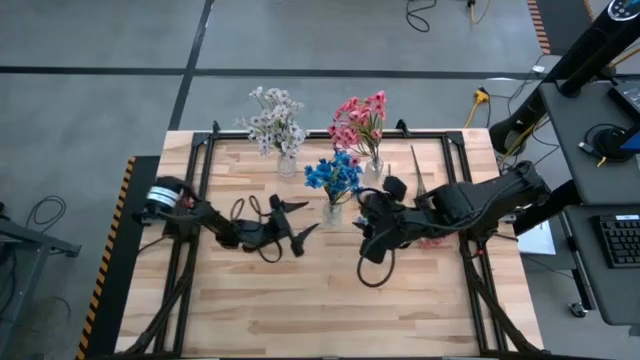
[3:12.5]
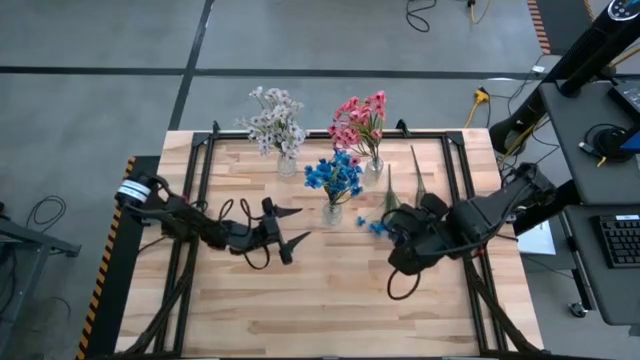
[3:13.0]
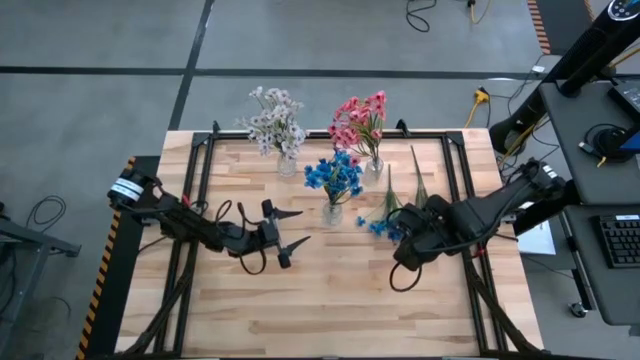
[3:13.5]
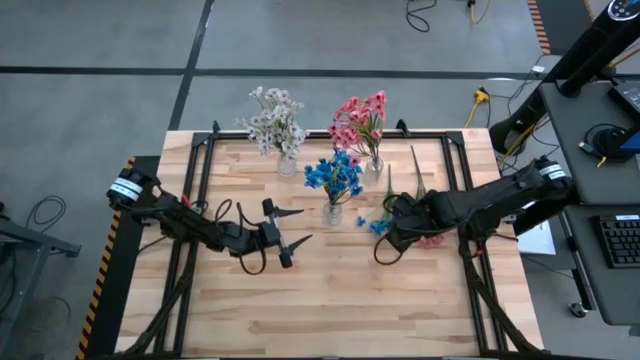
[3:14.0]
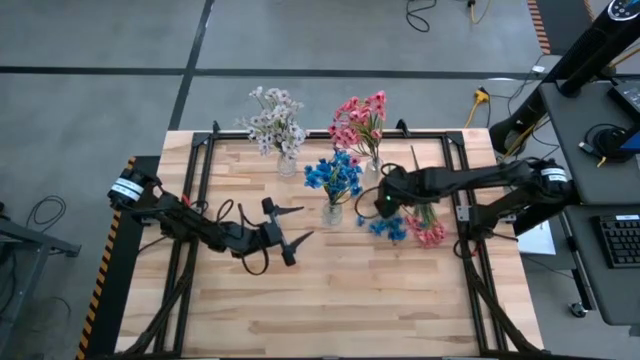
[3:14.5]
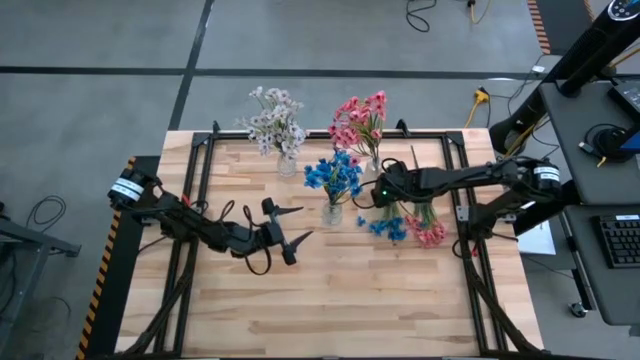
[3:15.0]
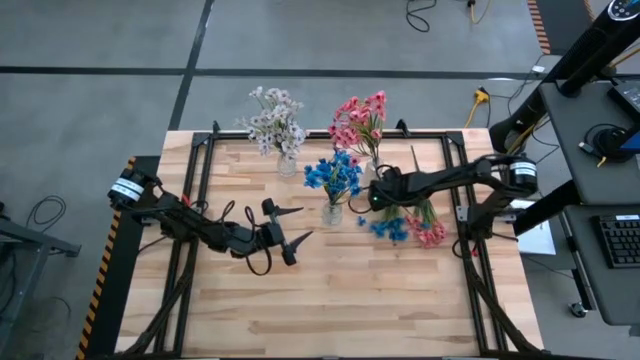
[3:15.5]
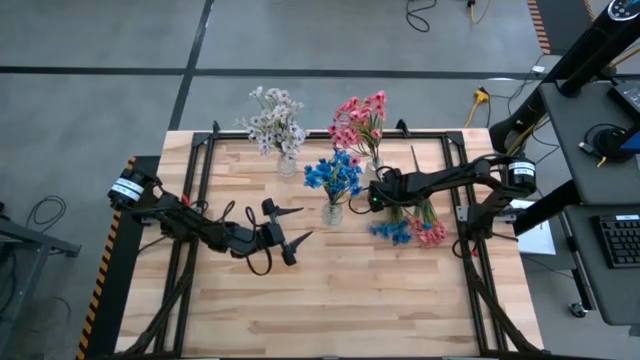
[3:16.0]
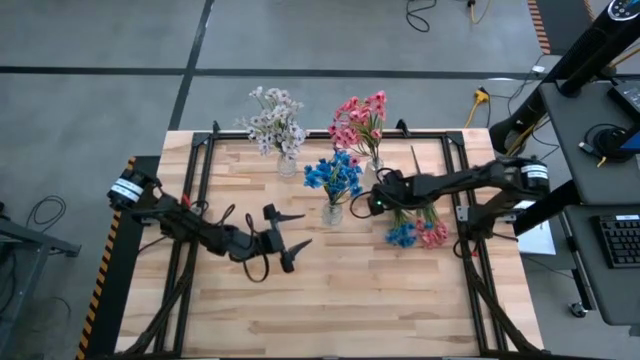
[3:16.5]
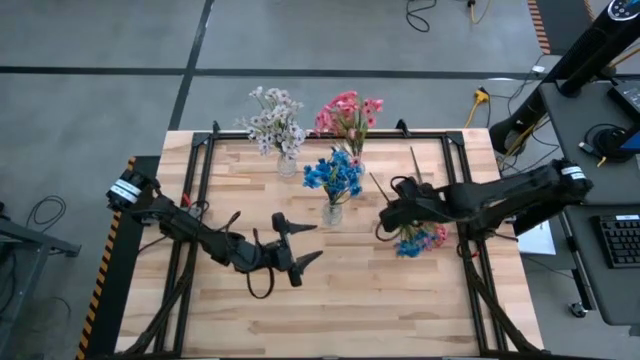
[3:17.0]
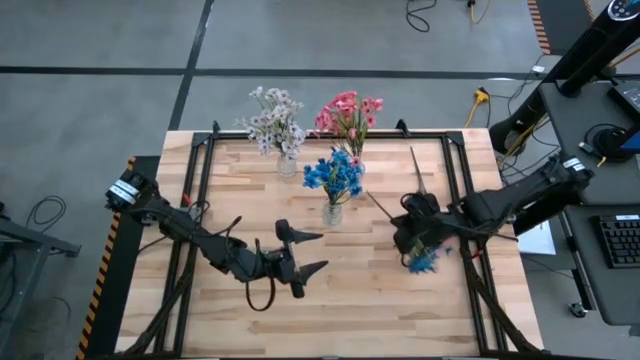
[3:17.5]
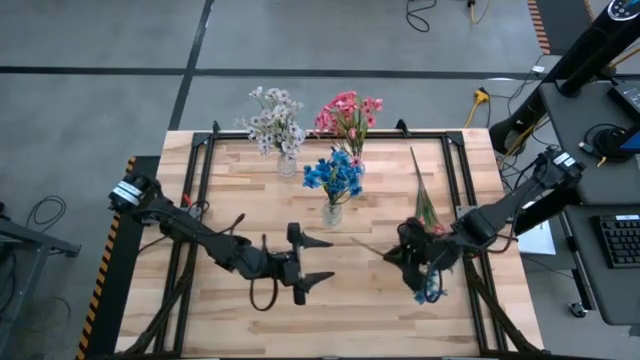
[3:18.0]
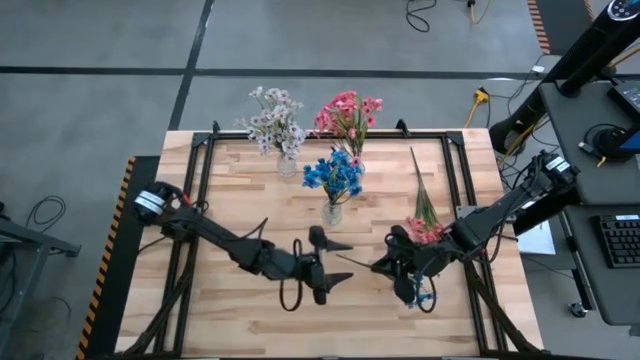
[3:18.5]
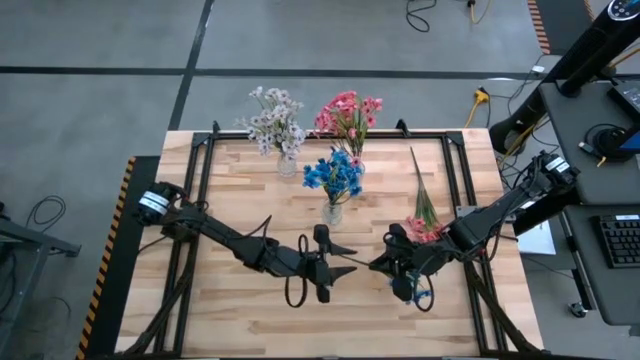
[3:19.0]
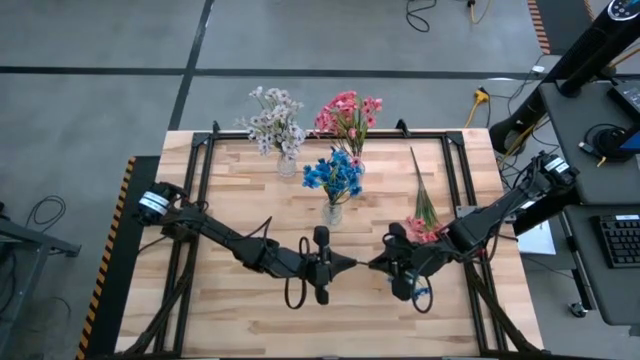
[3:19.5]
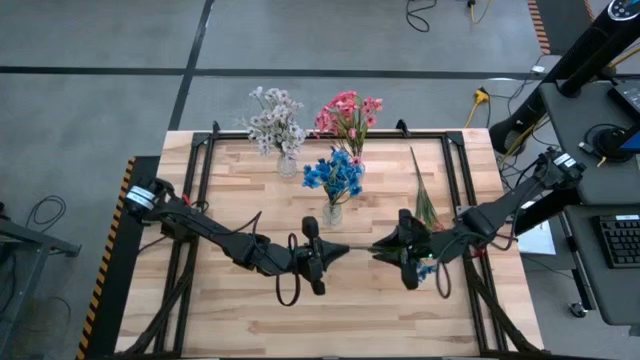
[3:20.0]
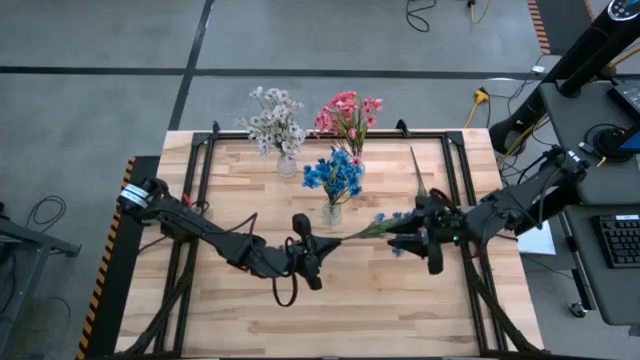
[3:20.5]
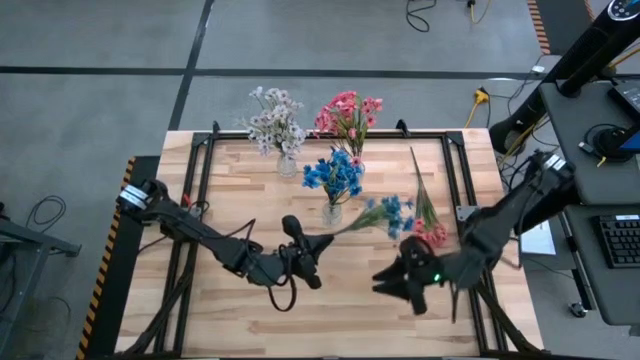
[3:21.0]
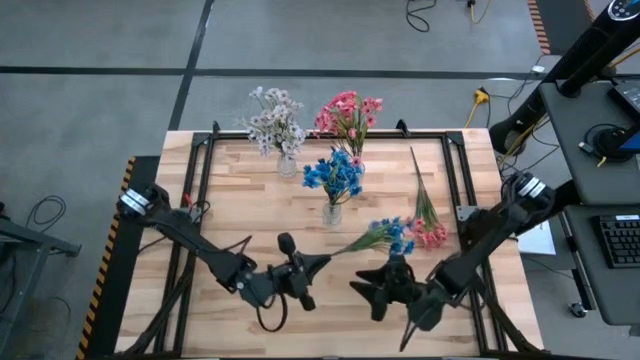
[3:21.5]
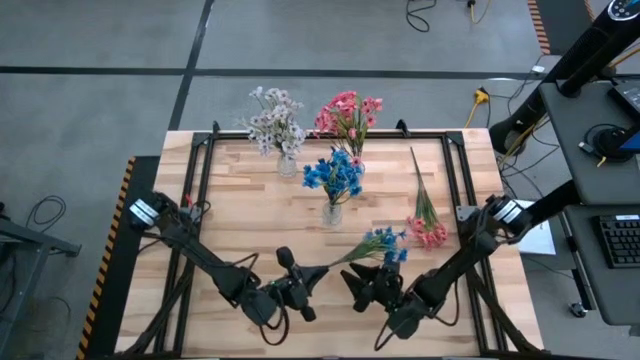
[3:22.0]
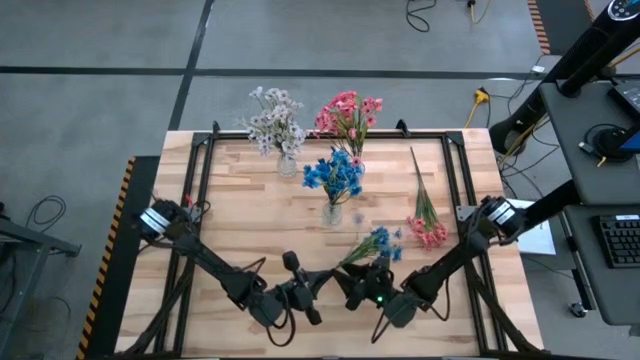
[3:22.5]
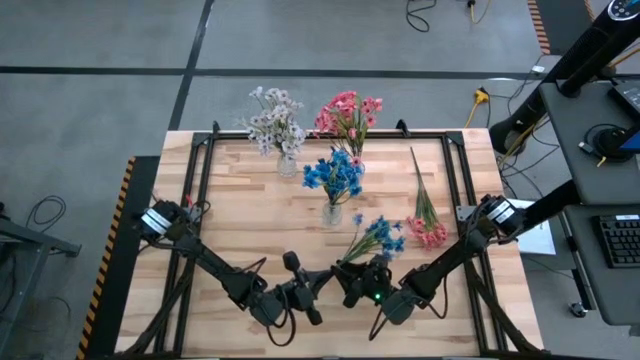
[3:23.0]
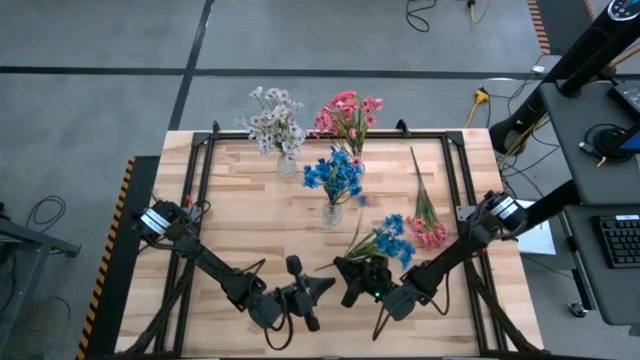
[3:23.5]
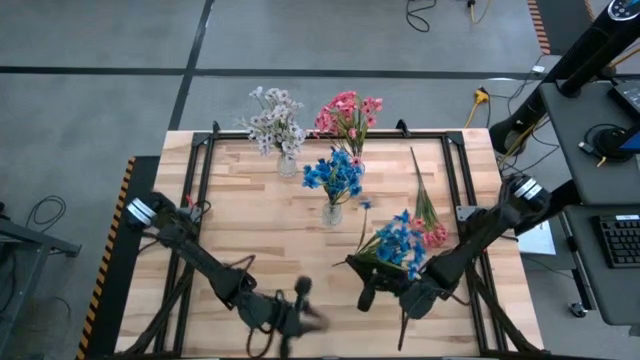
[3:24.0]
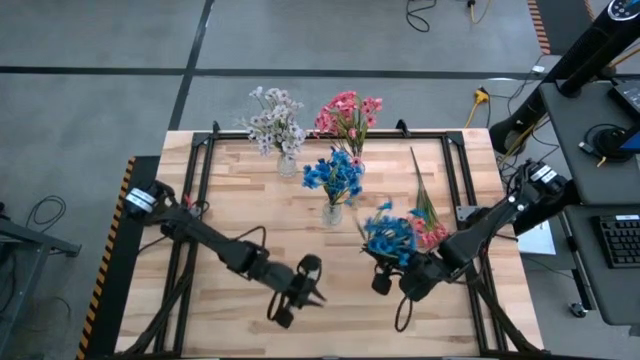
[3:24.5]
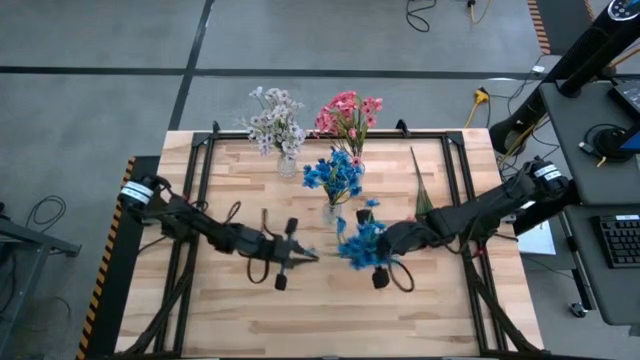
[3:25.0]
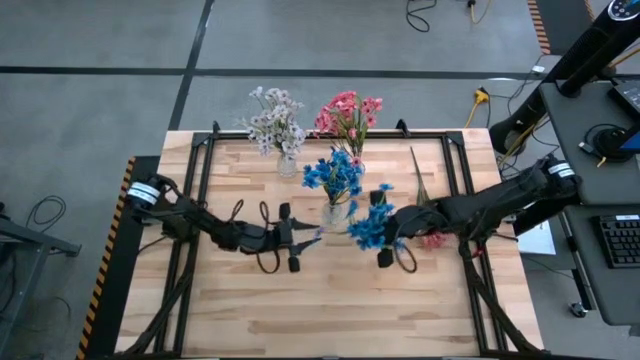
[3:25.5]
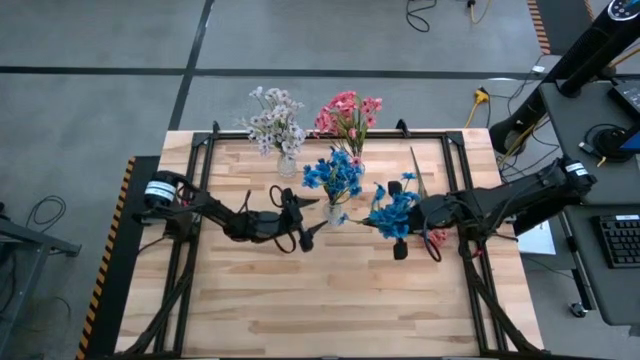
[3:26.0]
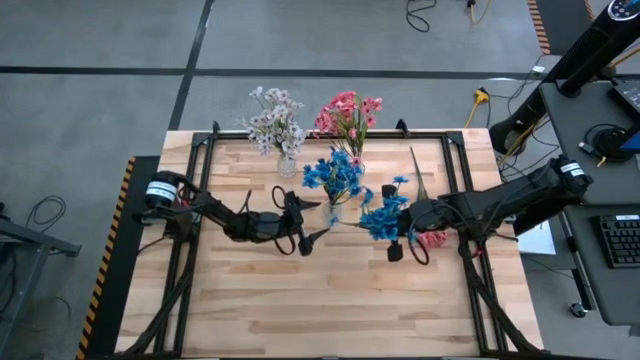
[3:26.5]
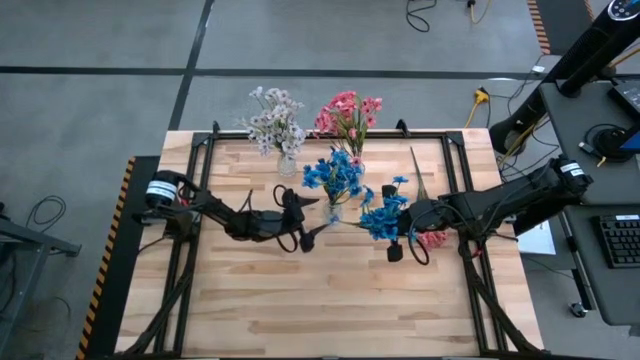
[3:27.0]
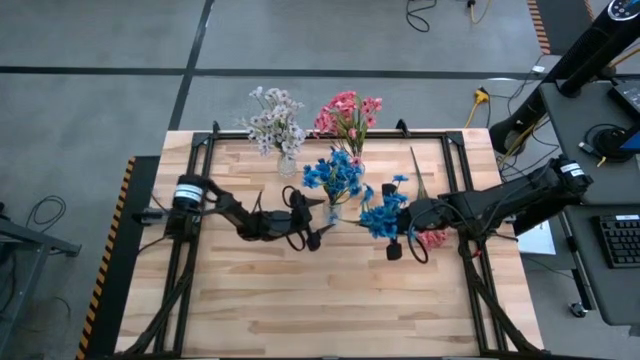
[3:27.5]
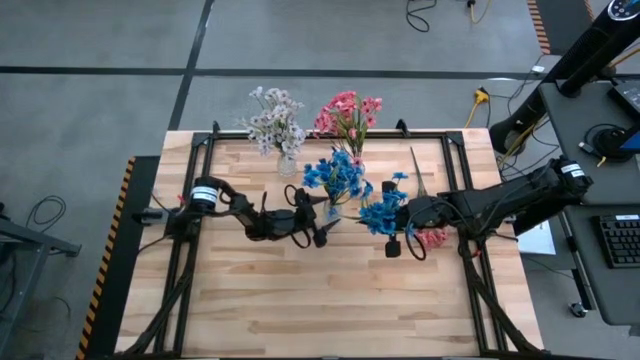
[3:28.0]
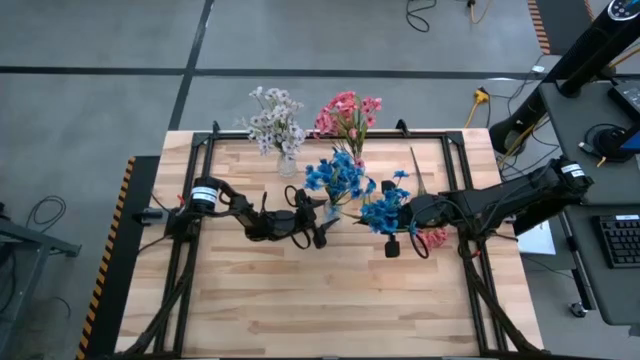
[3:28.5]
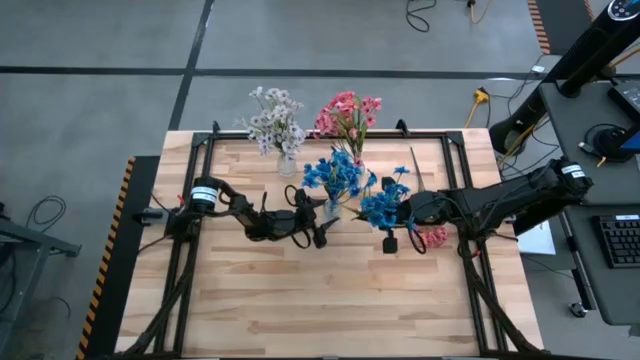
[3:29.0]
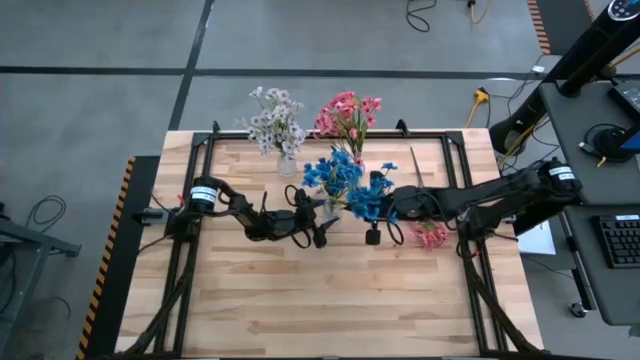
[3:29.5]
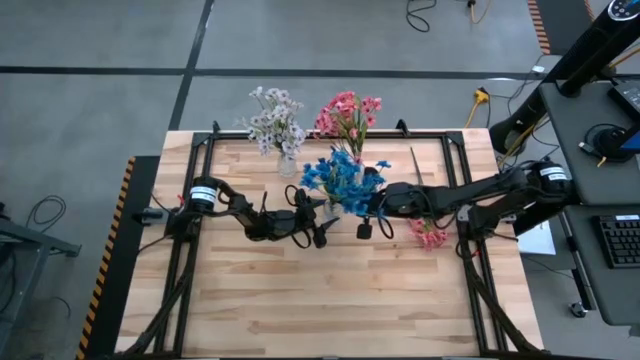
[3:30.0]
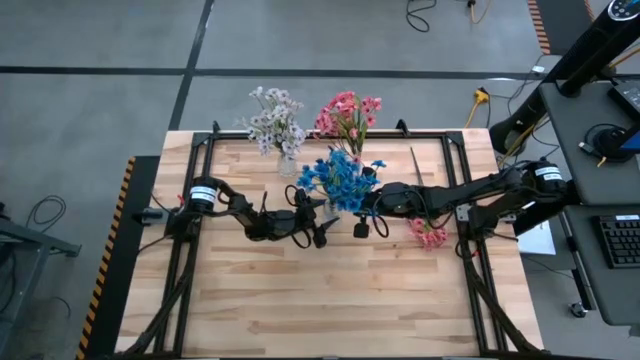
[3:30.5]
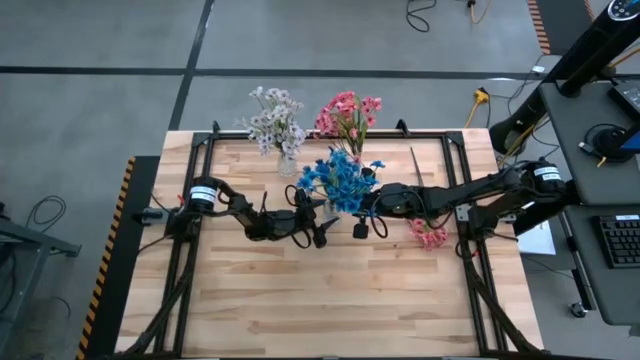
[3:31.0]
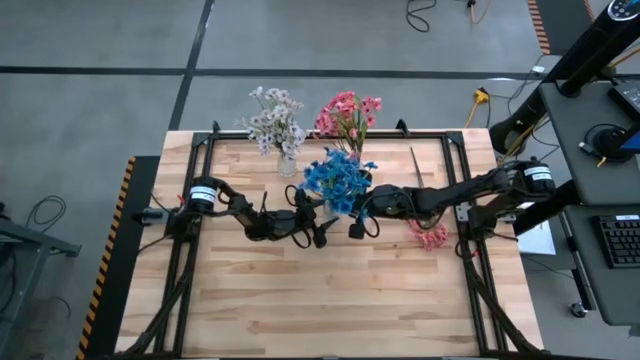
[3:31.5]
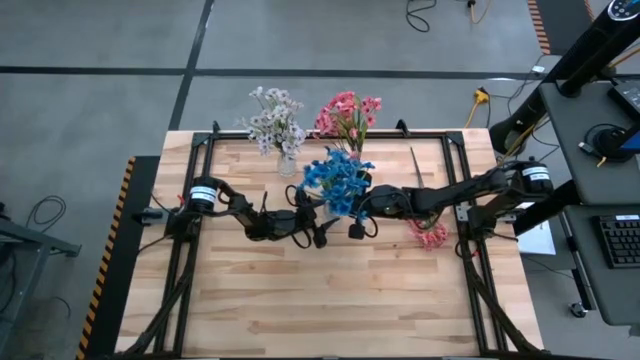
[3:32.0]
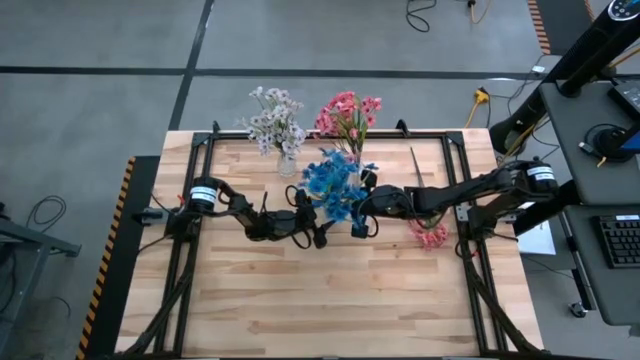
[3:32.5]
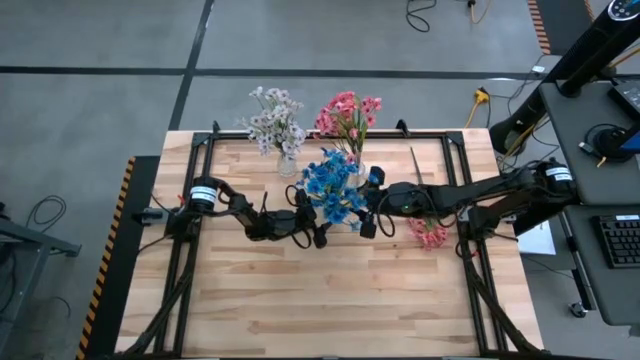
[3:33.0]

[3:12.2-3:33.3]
Task: Sort flowers into vase by color
Put the blue flowers into the middle transparent vase
